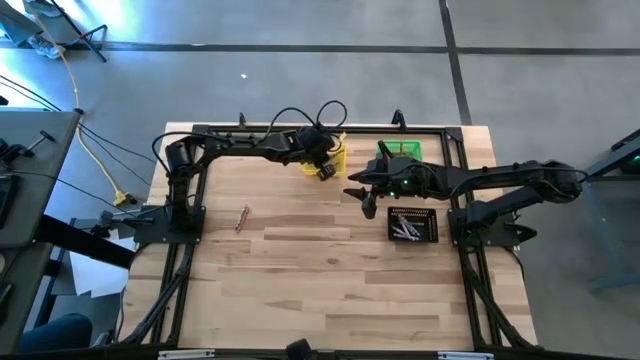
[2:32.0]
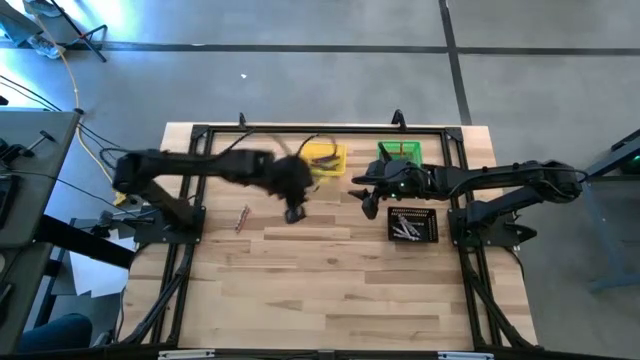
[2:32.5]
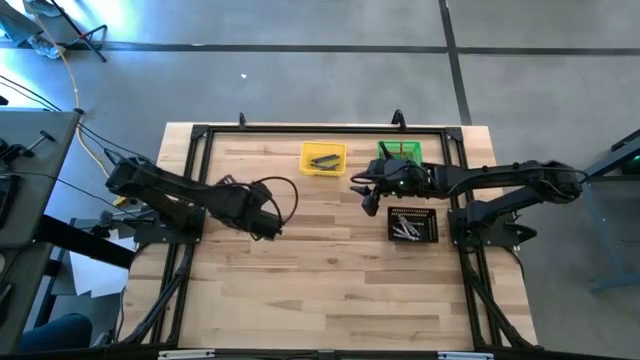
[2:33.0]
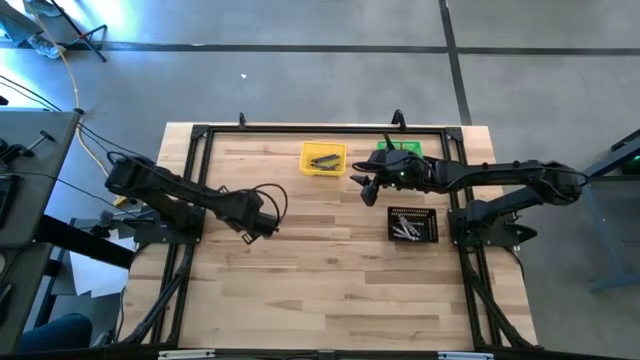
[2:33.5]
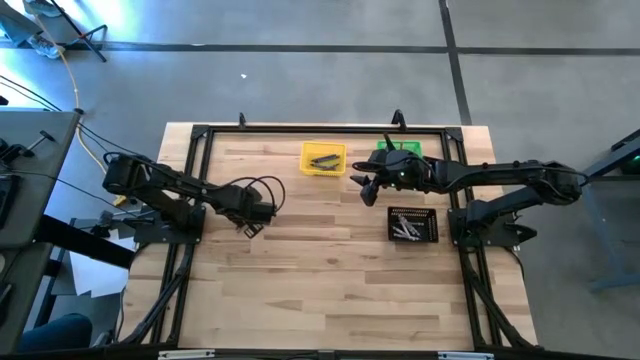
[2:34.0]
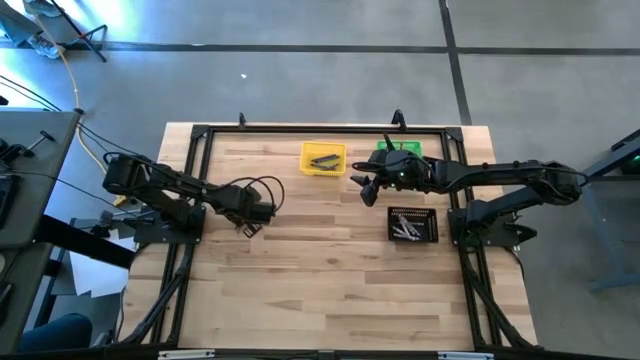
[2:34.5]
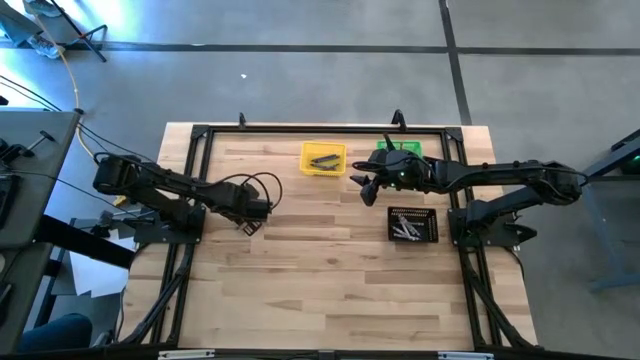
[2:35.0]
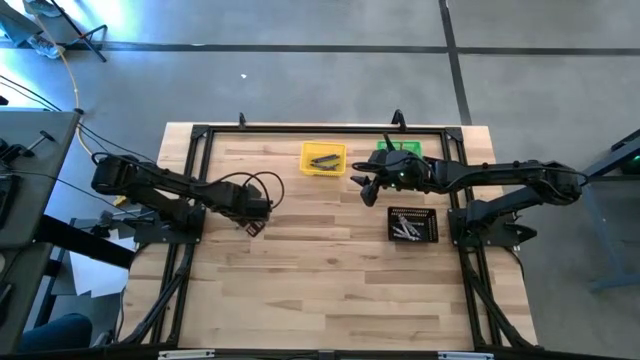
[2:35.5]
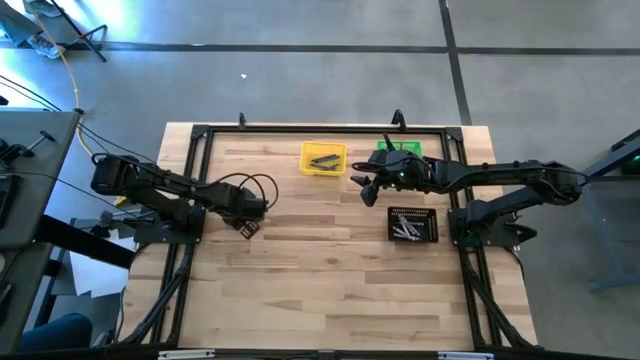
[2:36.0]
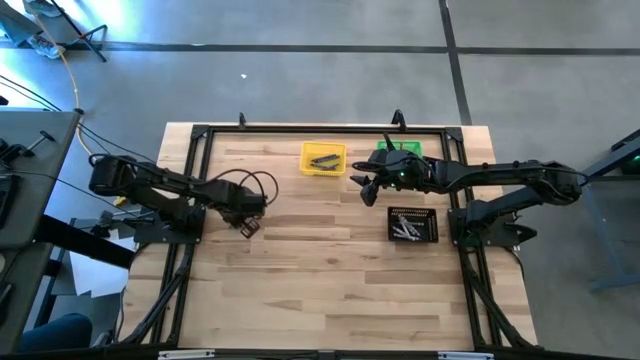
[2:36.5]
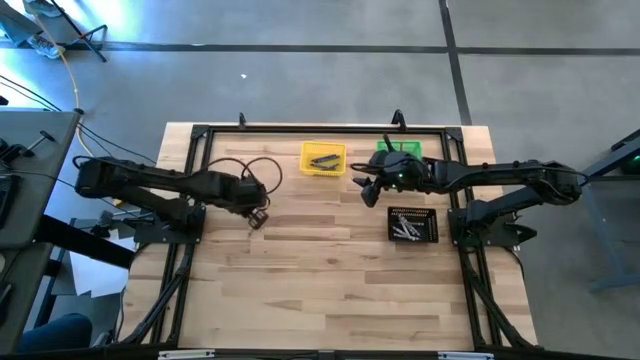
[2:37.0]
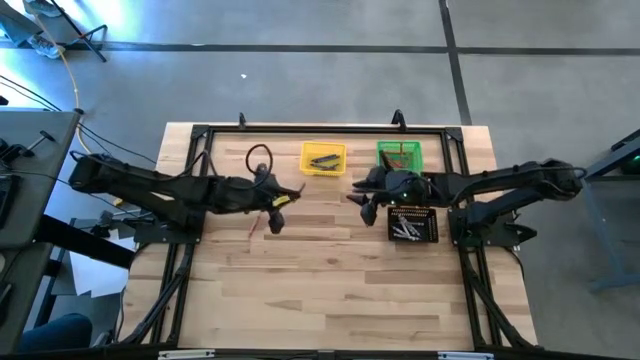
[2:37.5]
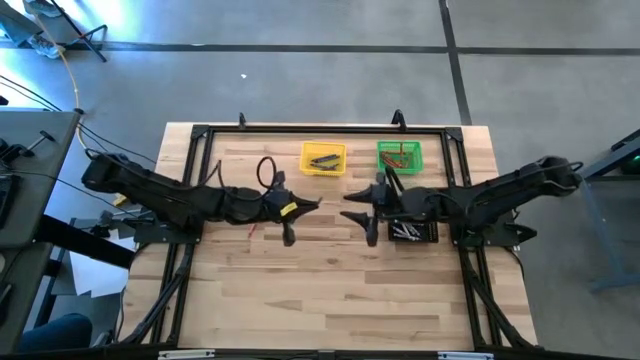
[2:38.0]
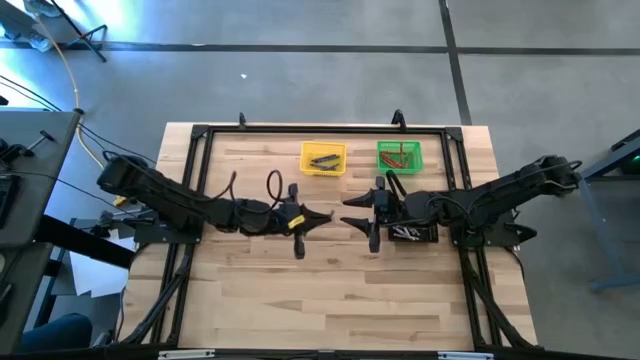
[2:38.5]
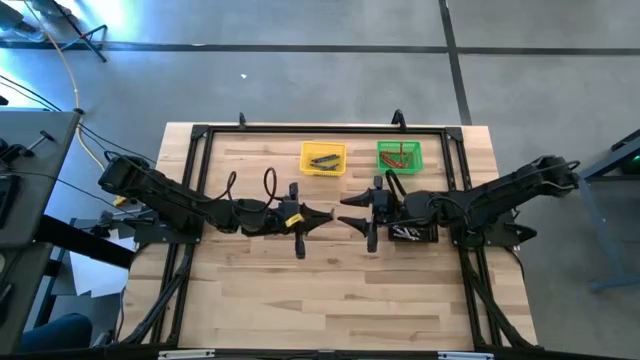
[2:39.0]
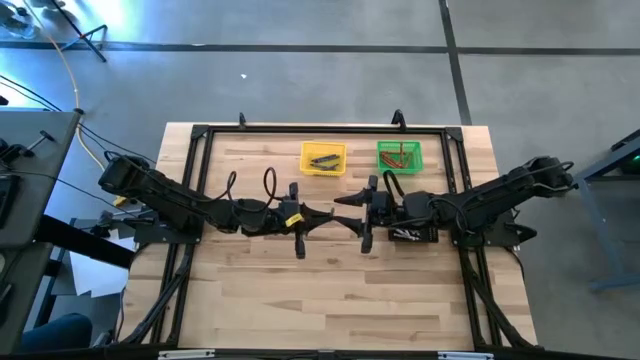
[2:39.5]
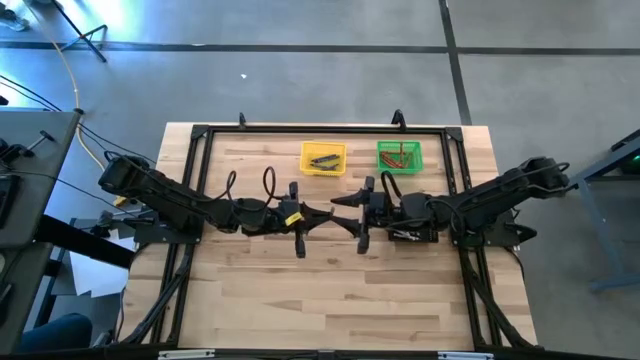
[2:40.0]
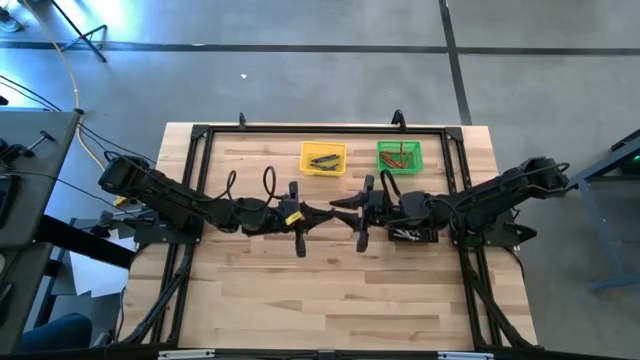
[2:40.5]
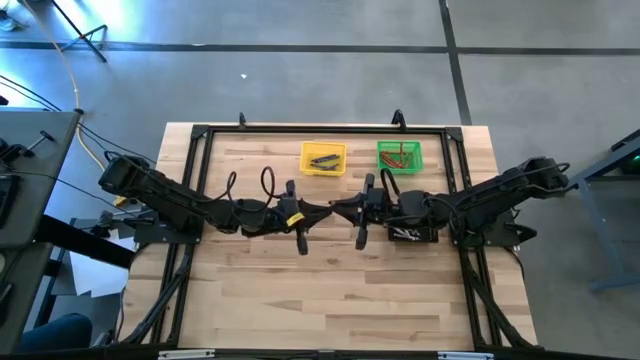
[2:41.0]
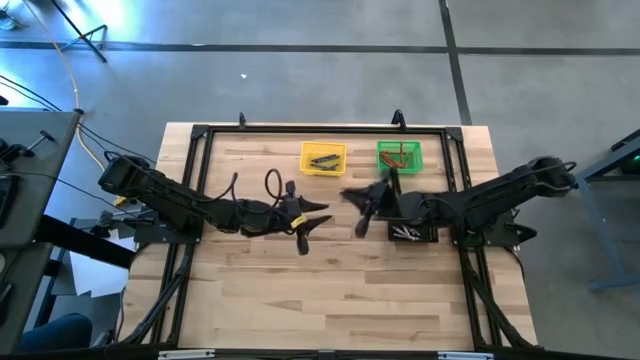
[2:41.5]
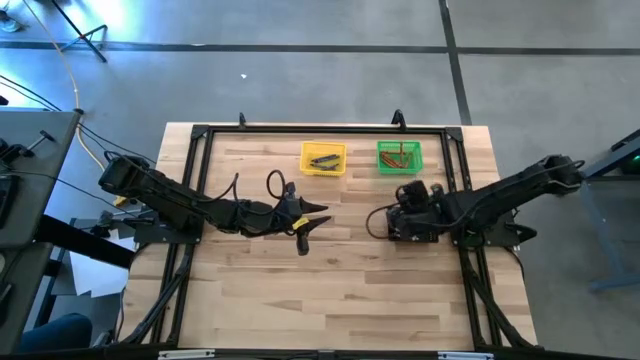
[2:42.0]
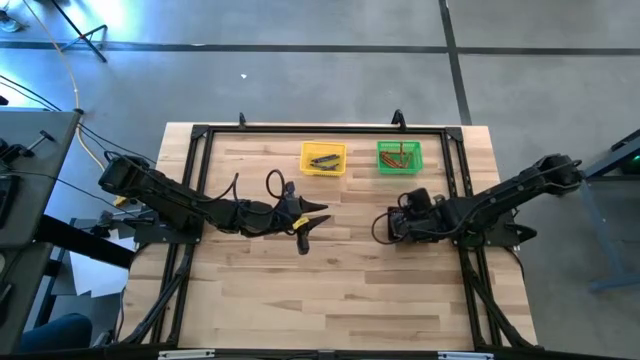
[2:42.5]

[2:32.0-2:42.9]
Task: Sort crayons
Put the gray crayon into the black bin

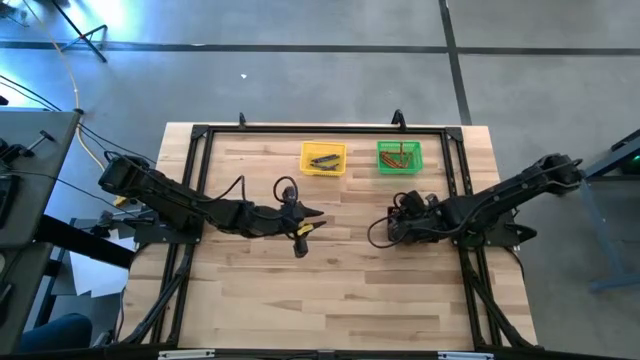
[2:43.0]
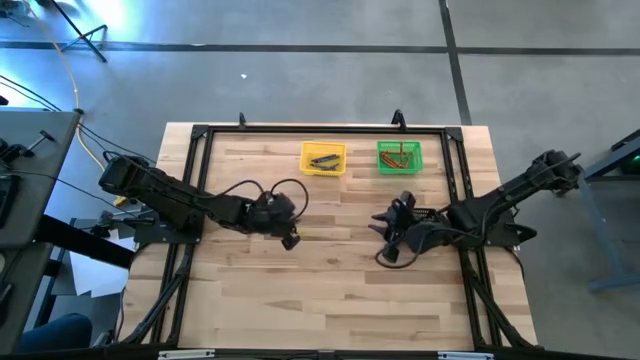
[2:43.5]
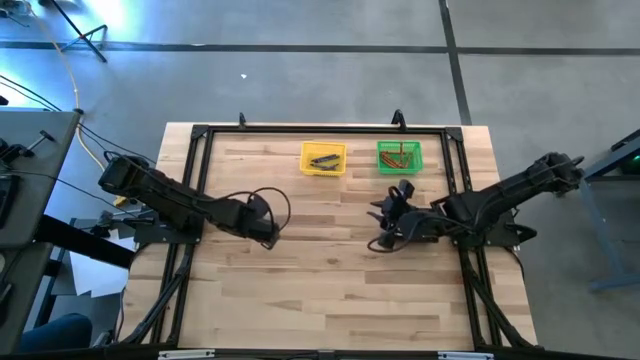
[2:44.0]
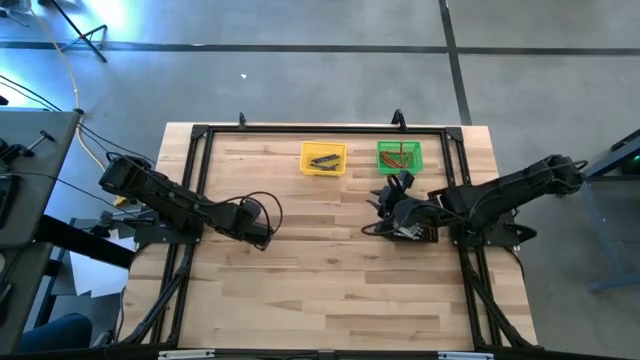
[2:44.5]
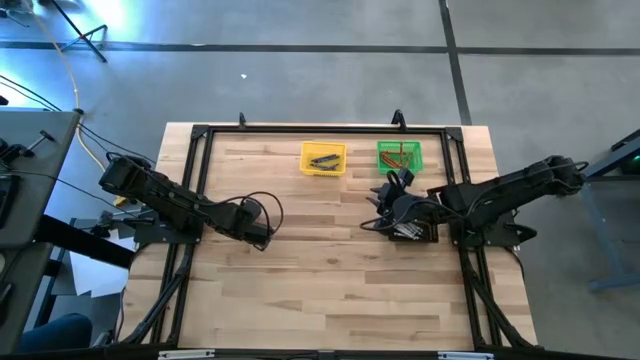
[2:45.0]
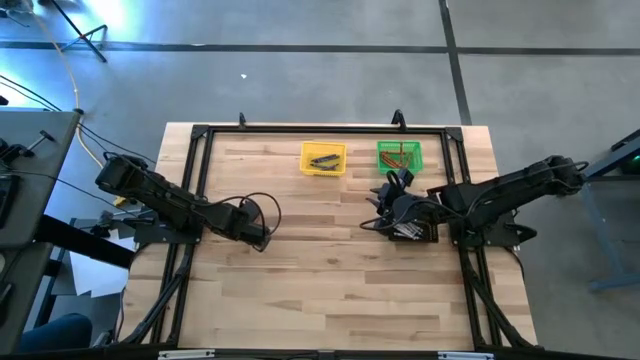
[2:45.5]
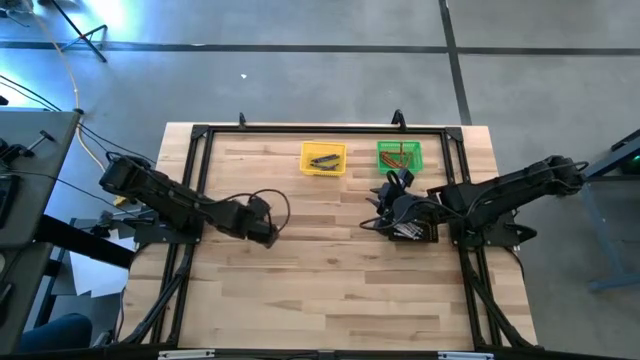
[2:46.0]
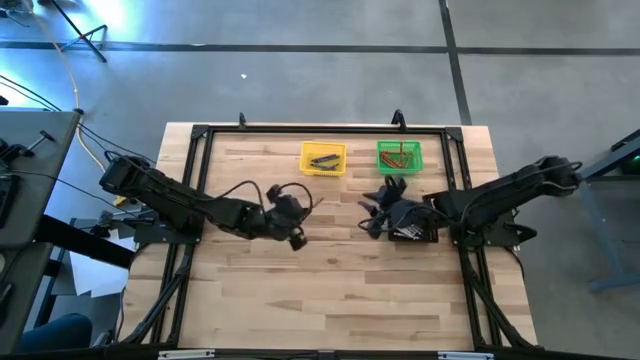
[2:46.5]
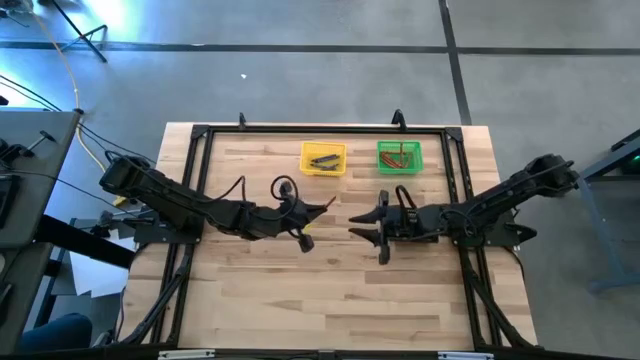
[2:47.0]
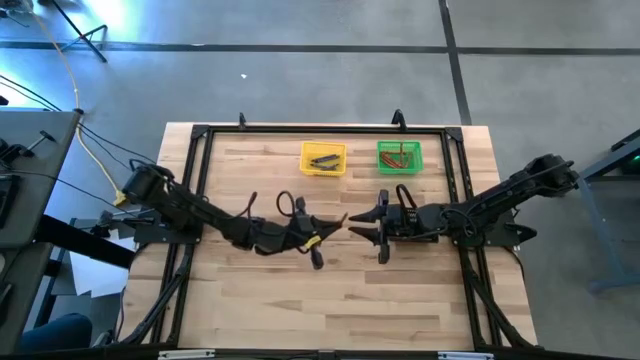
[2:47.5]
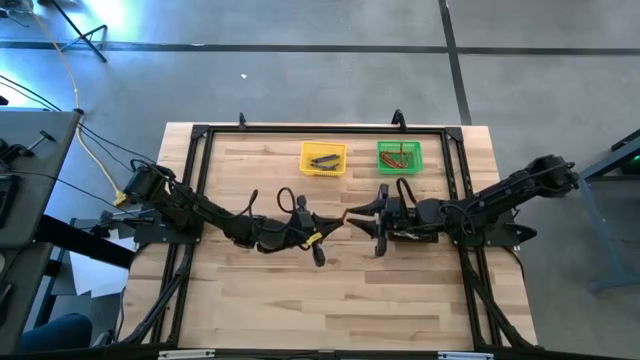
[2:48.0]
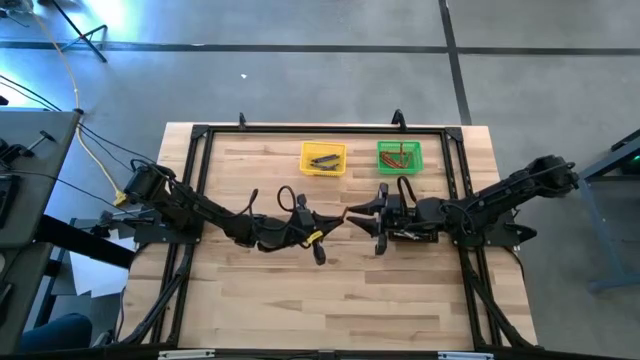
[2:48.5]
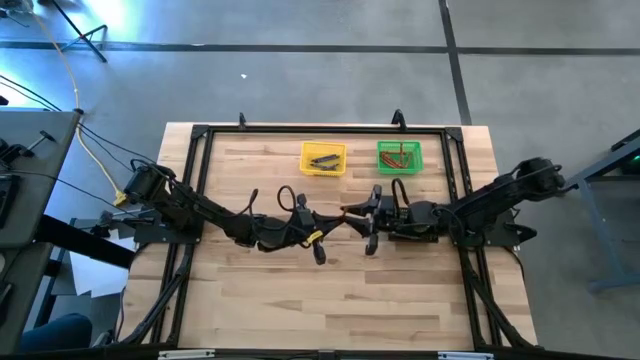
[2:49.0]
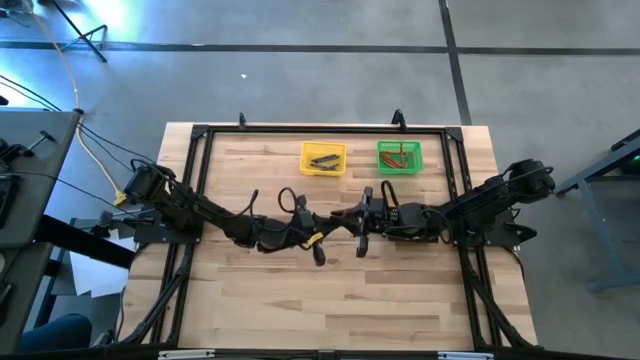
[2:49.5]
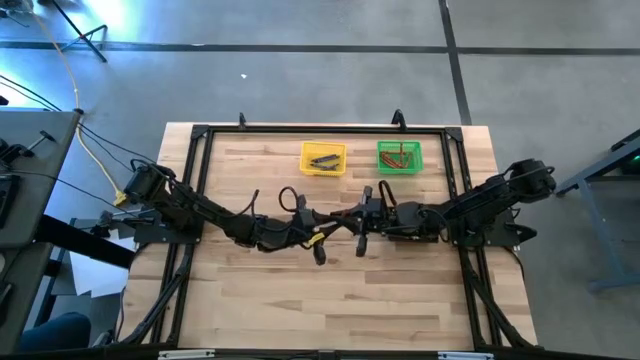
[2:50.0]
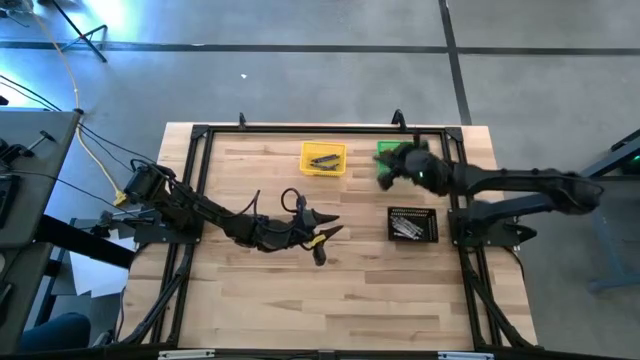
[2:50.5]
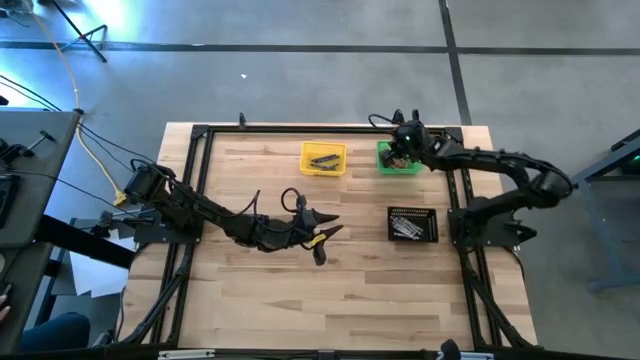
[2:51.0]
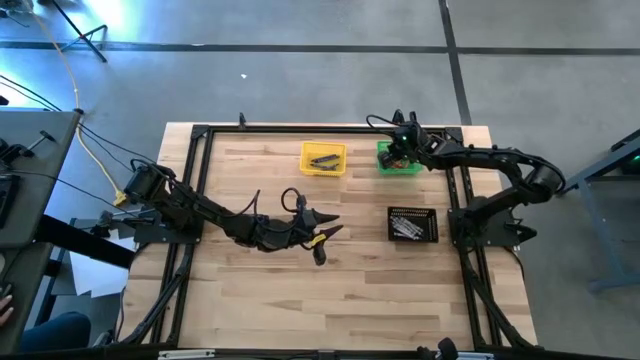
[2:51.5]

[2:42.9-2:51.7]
Put the orange crayon into the green bin

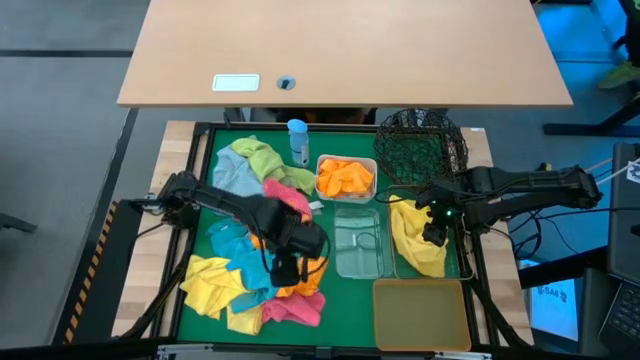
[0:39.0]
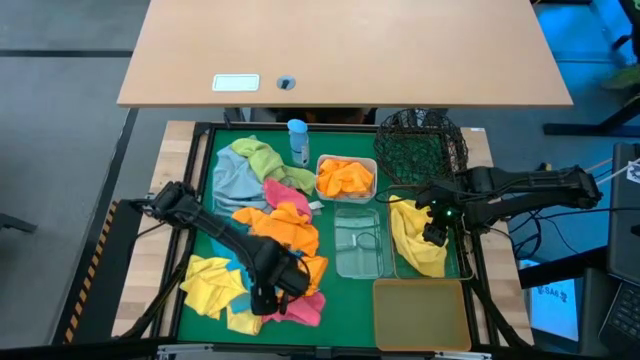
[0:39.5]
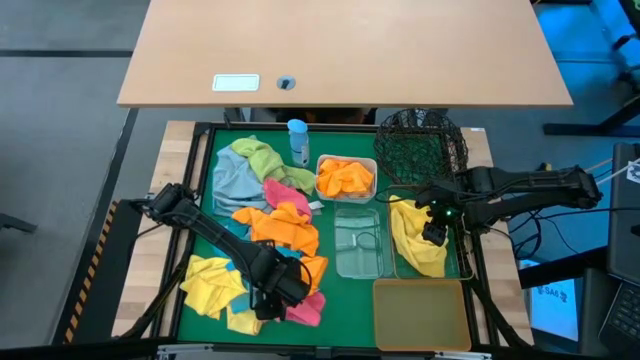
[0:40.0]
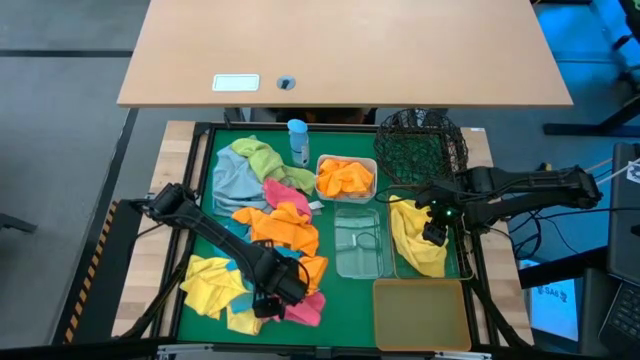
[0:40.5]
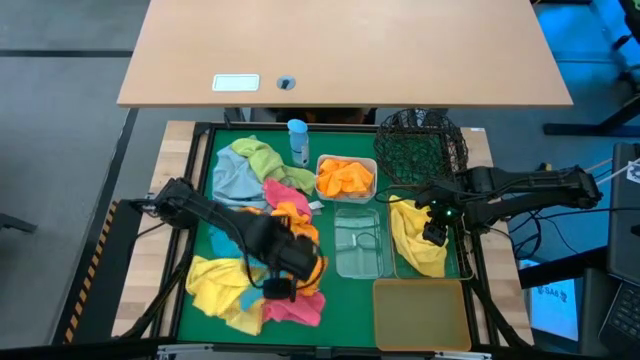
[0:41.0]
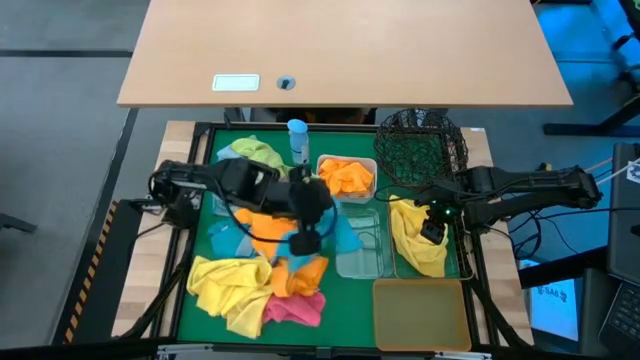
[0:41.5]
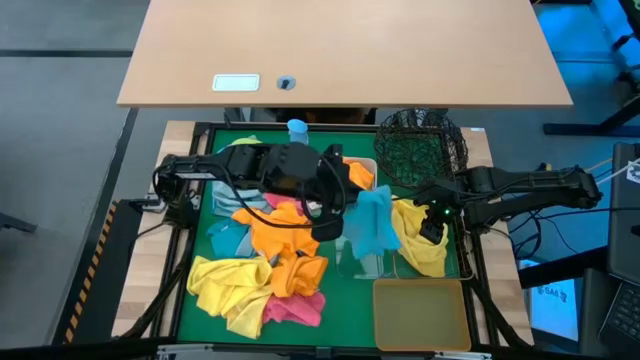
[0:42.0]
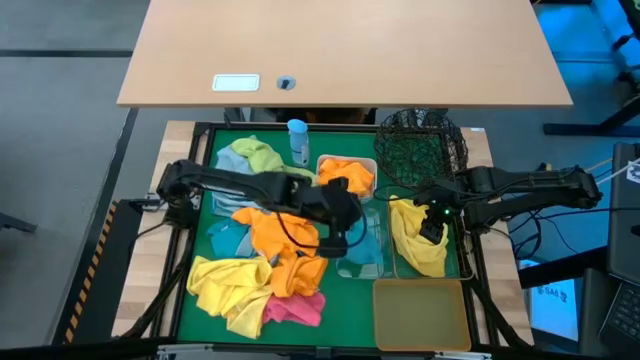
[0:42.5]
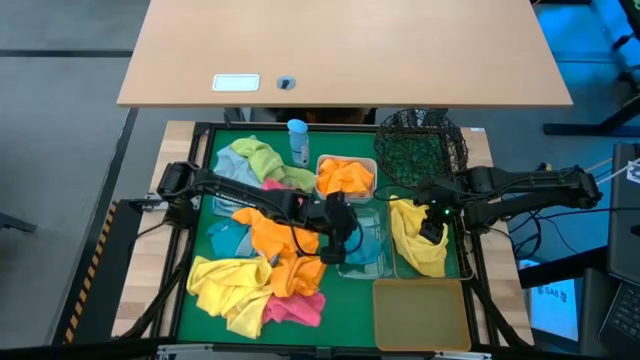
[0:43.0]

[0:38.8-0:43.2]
Task: Sort microfiber towel by color & place in baskets
Put the blue towel into the transparent bin
